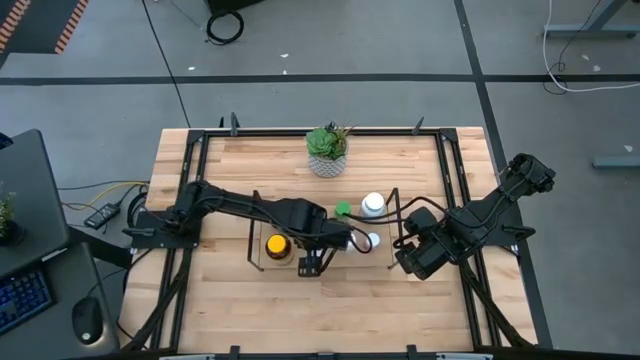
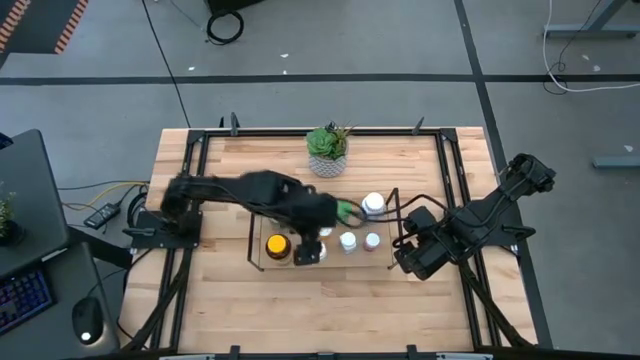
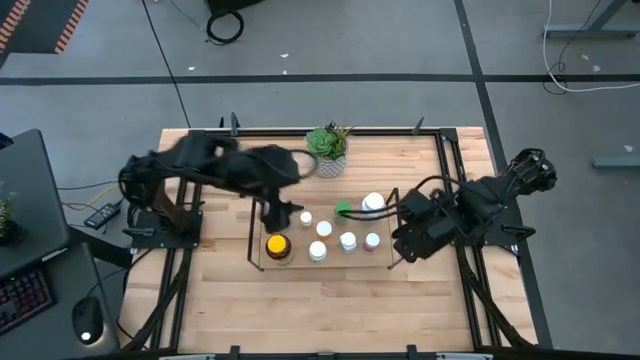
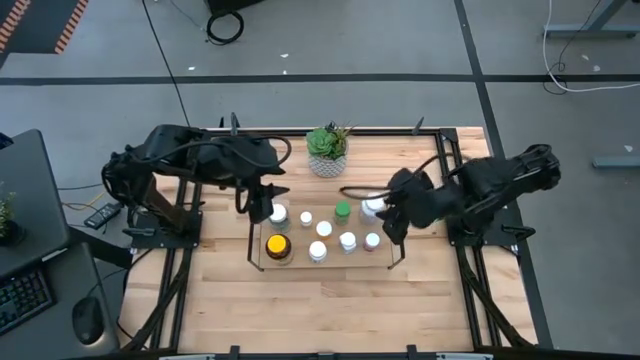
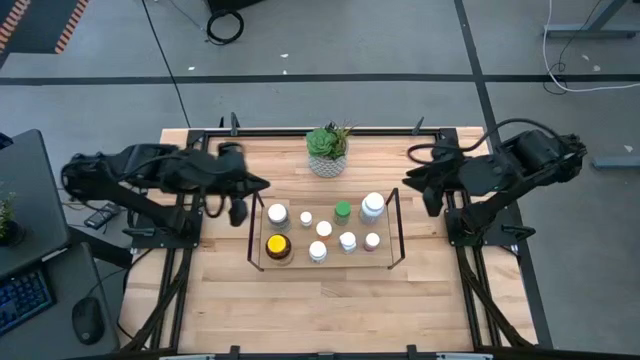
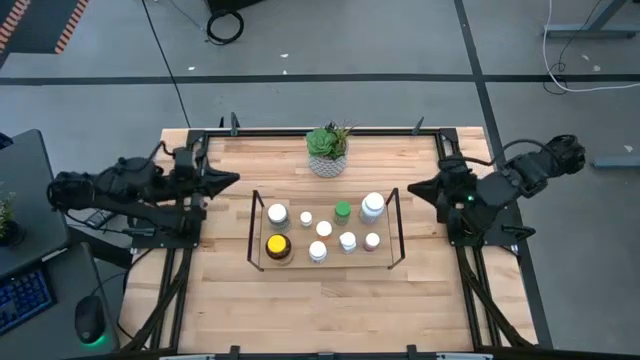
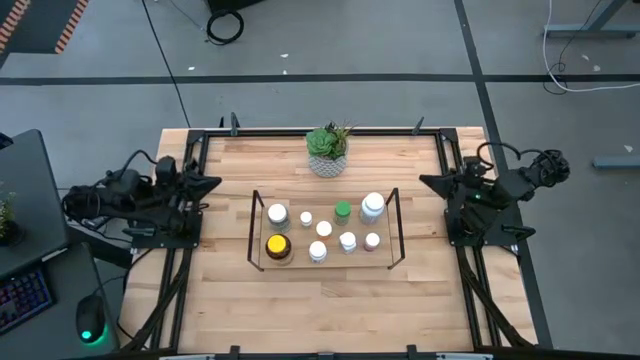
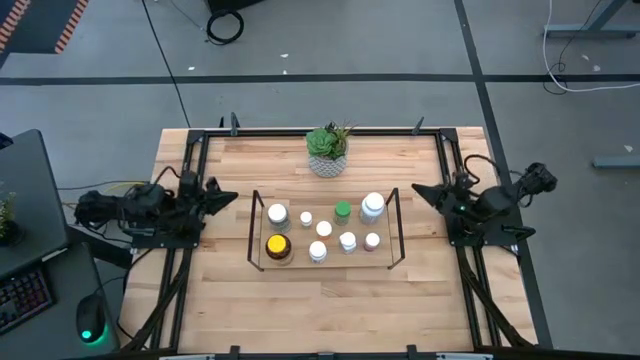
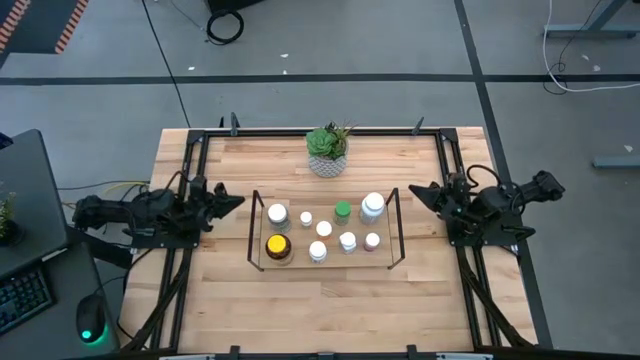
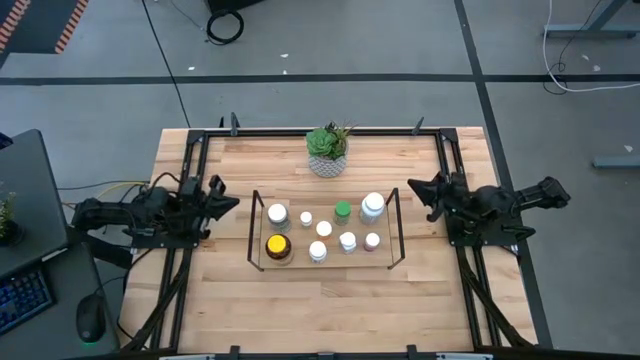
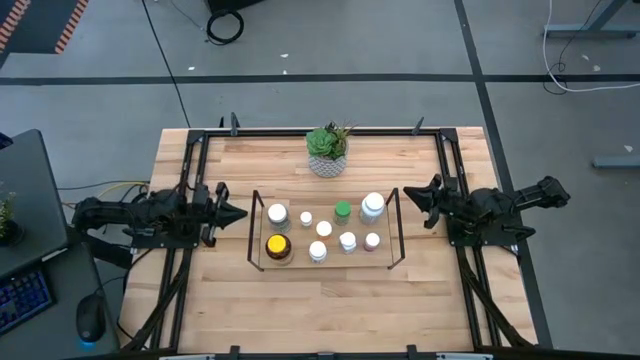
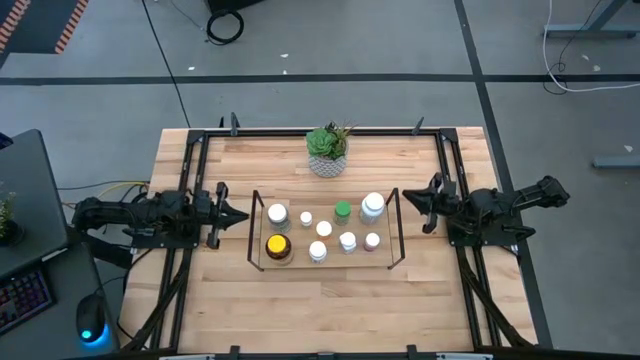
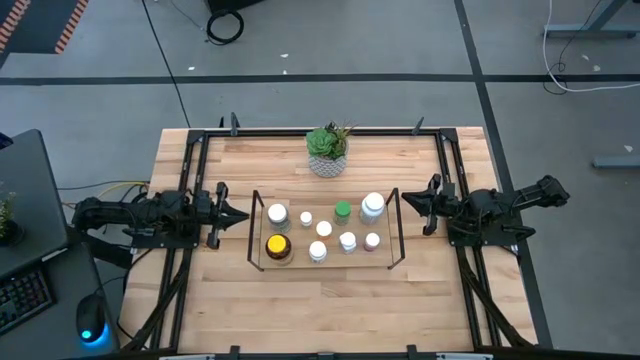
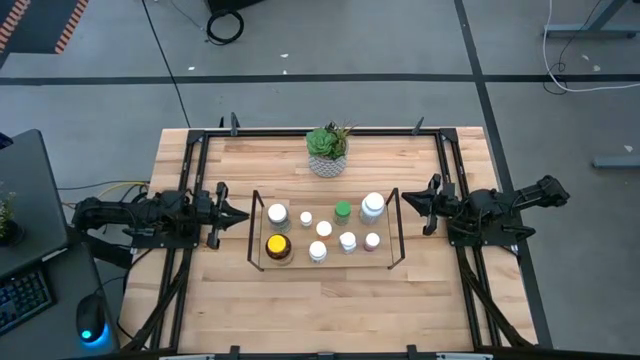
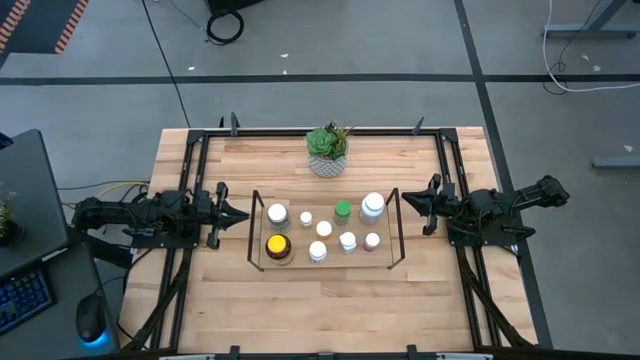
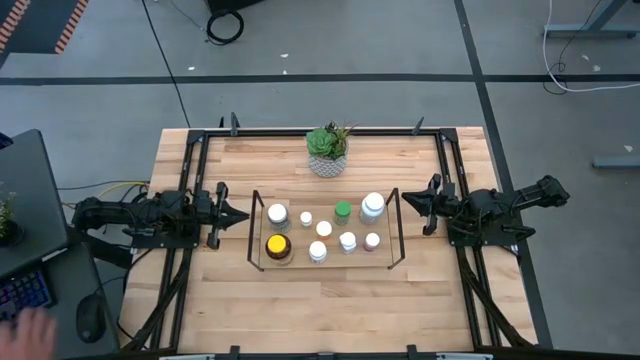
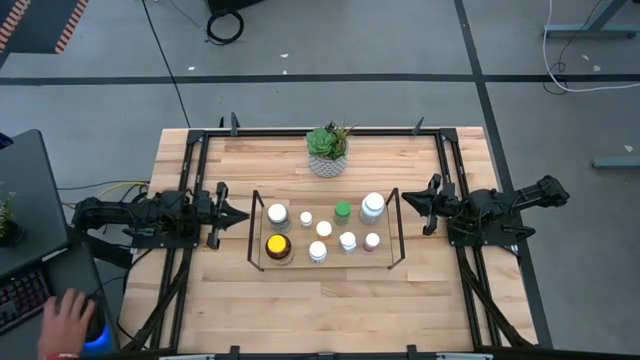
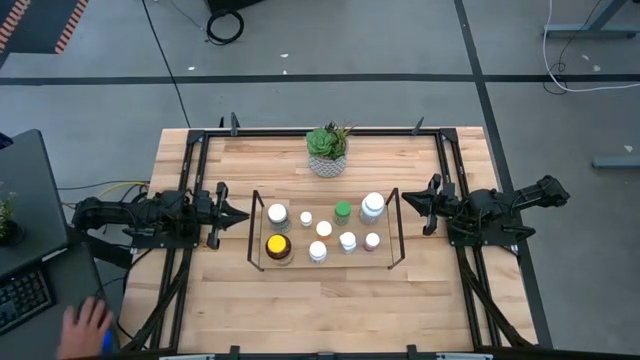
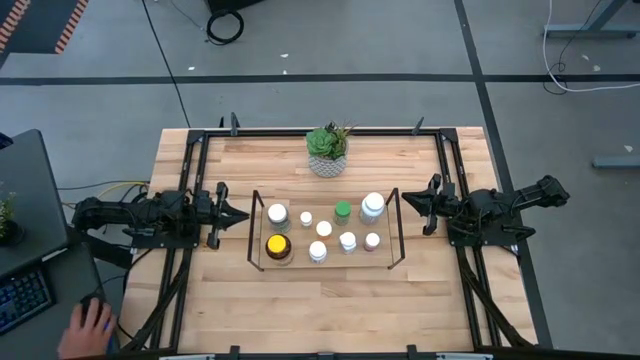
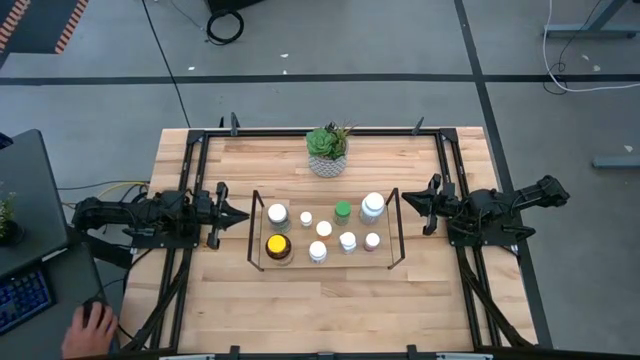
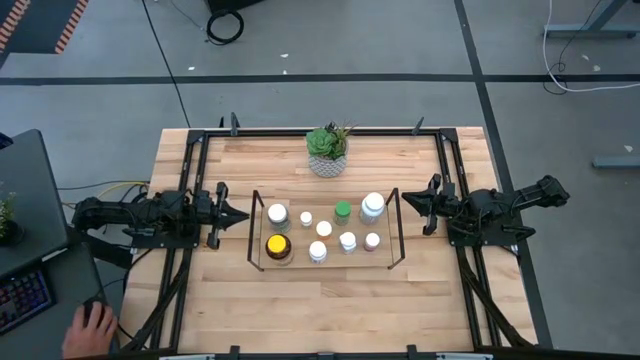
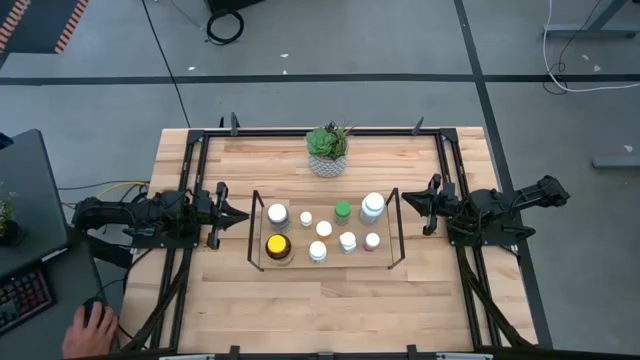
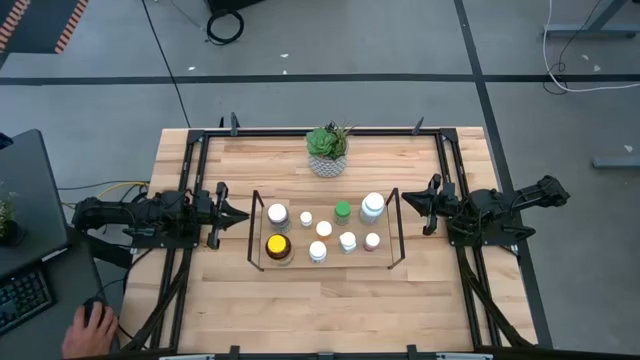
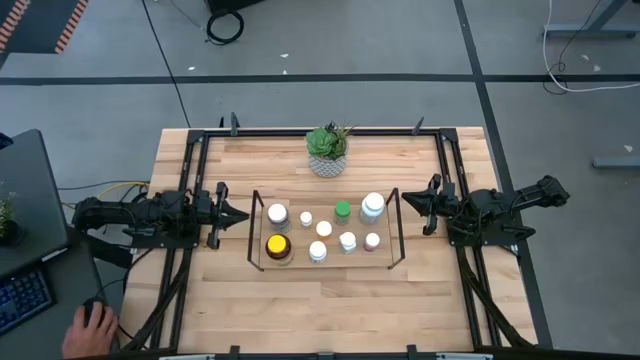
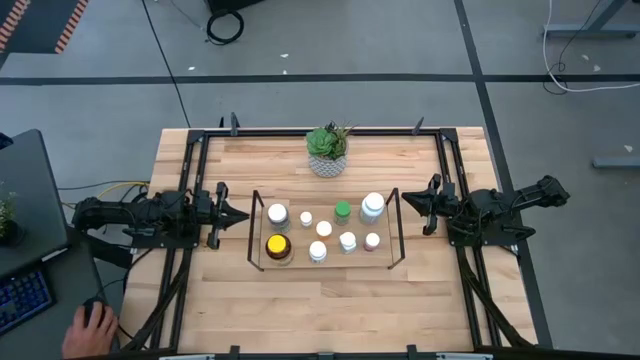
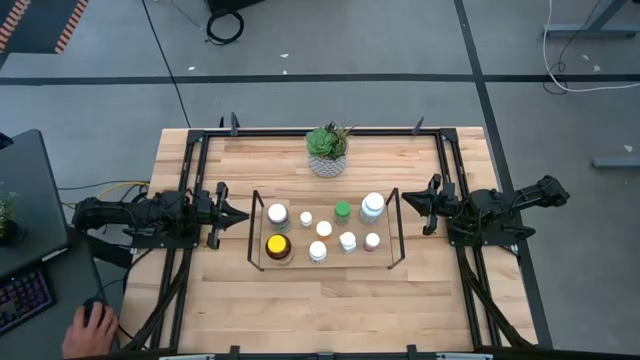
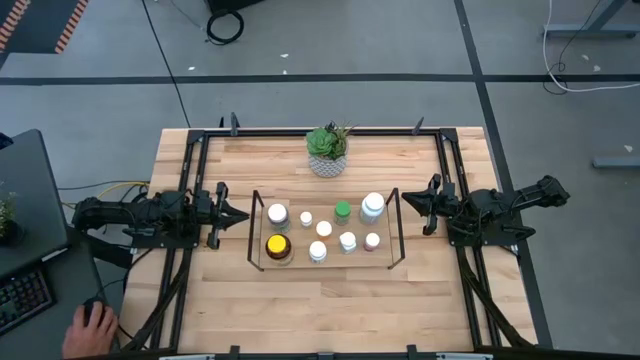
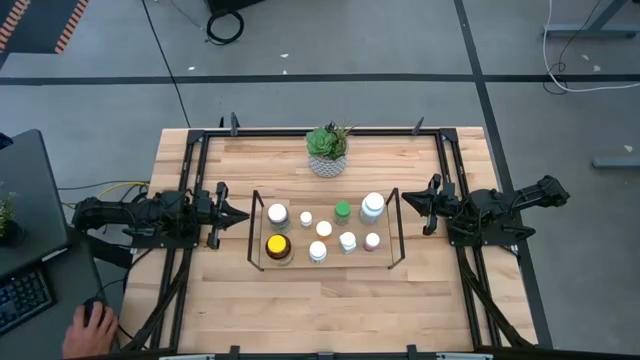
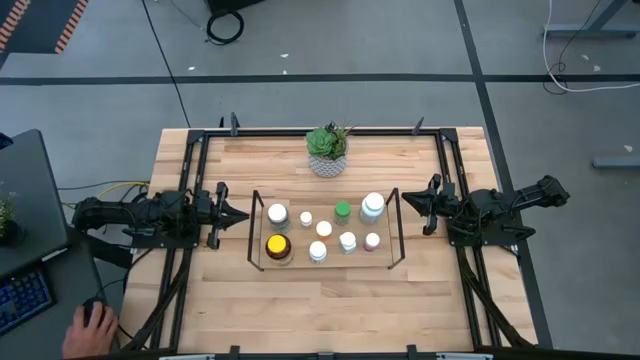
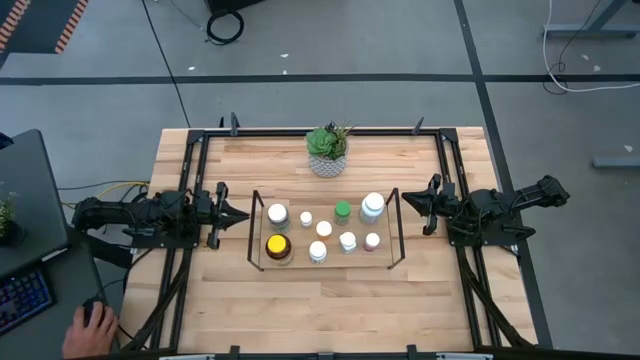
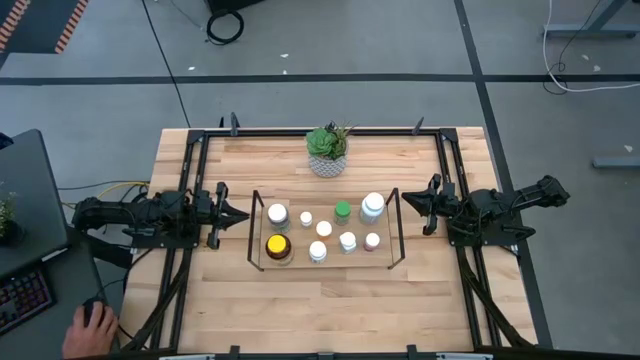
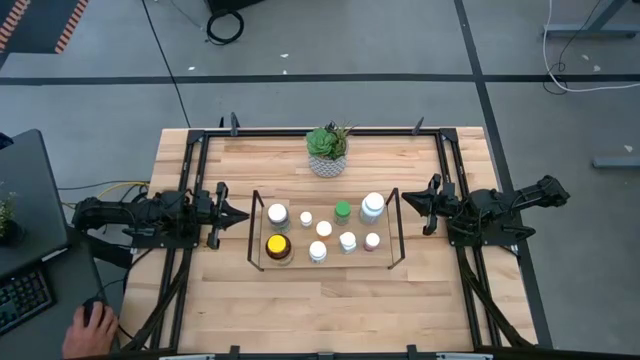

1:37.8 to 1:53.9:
Task: Pick and place medicine bottles onto shelf by color
Return to Home Position

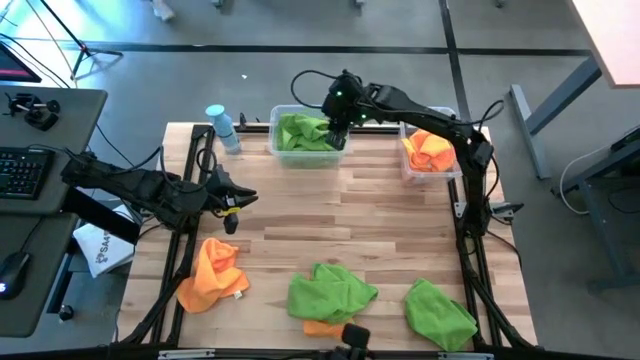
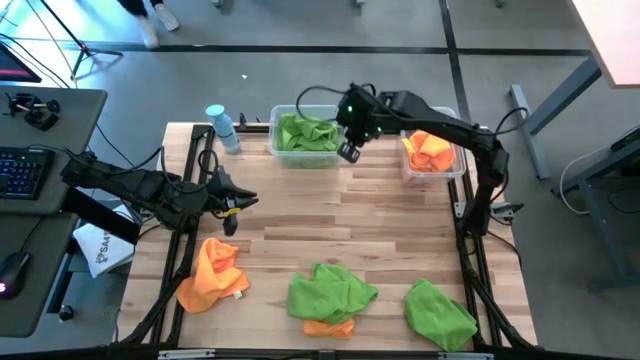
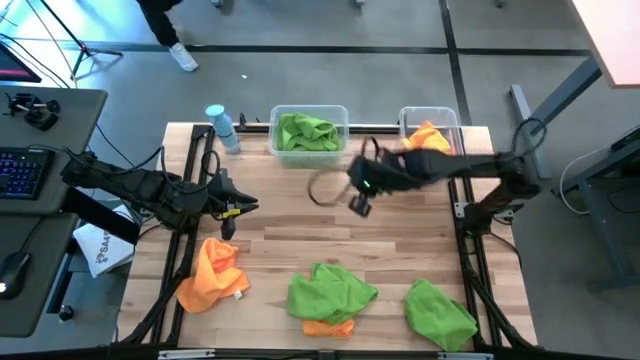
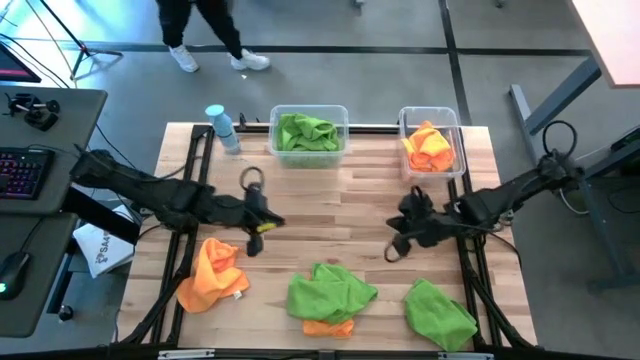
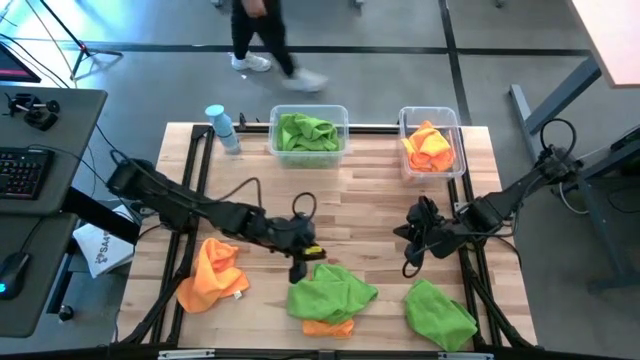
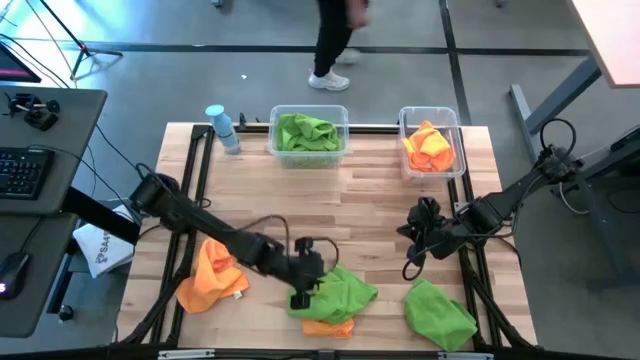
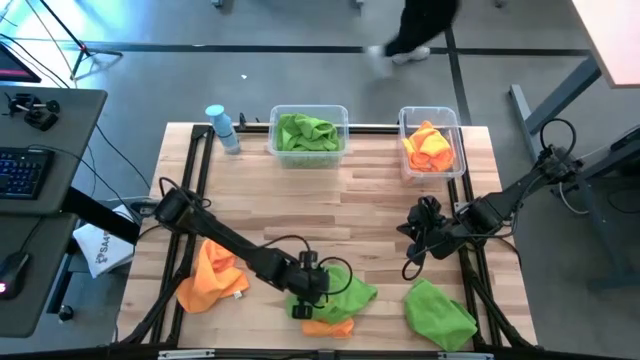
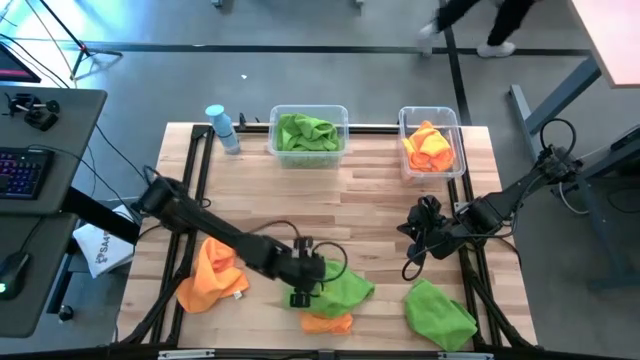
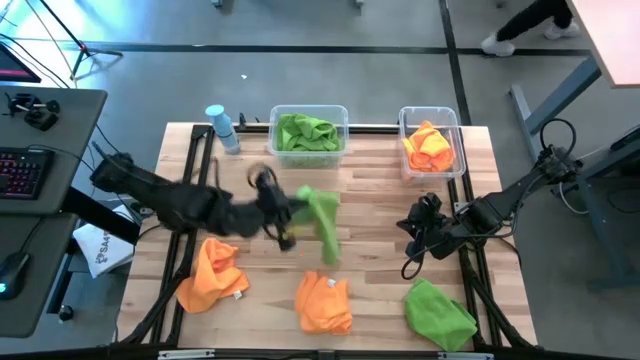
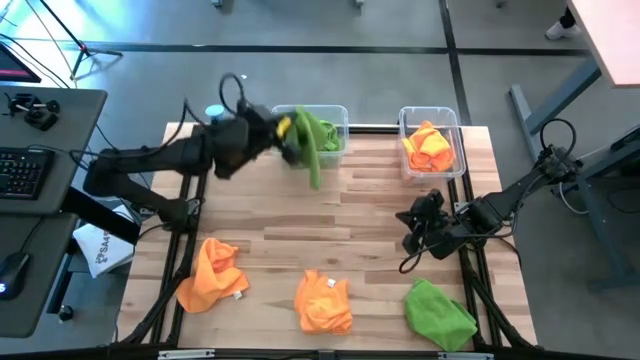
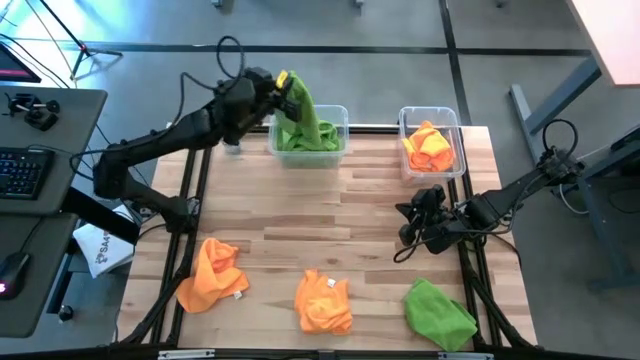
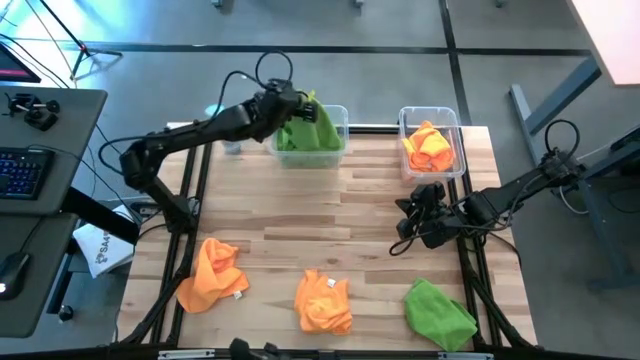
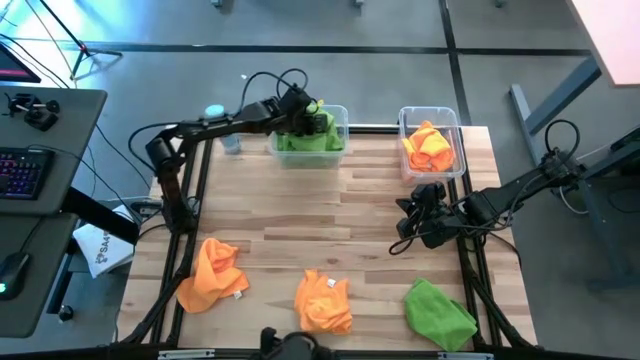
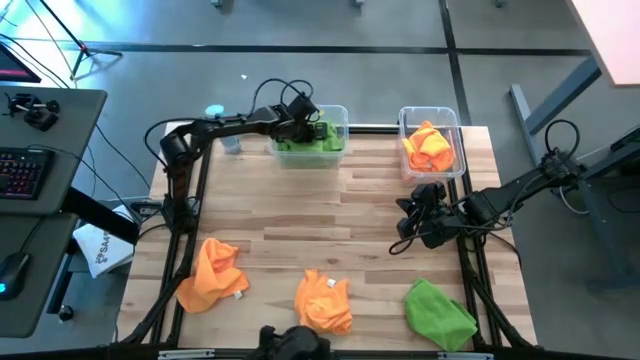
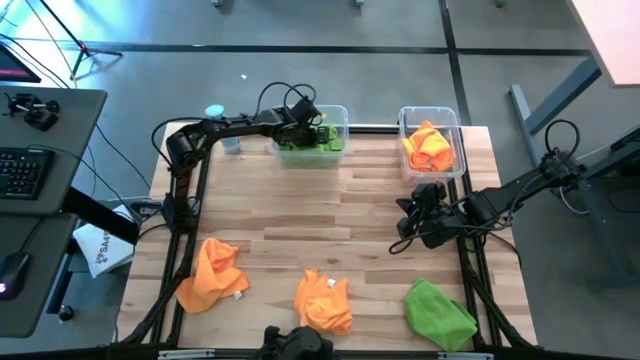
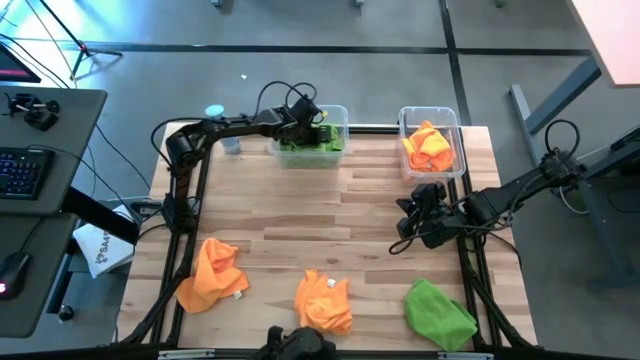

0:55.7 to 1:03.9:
Task: Sort microfiber towel by color & place in baskets
Put the green towel into the left transparent bin
